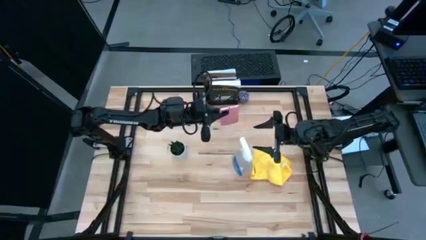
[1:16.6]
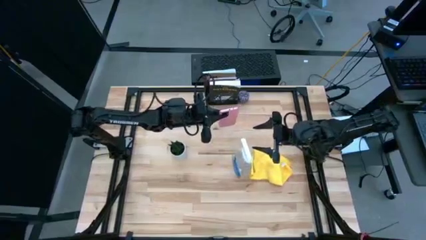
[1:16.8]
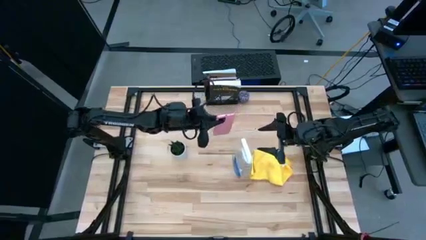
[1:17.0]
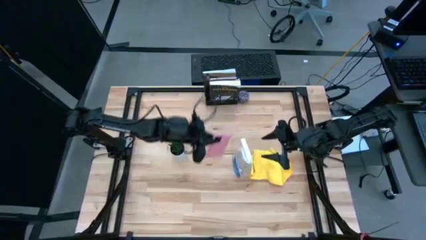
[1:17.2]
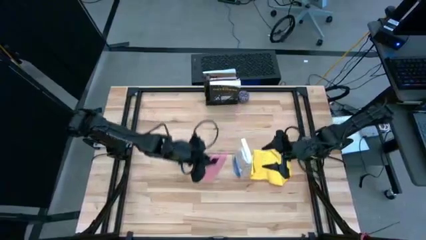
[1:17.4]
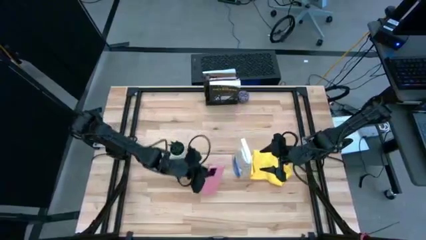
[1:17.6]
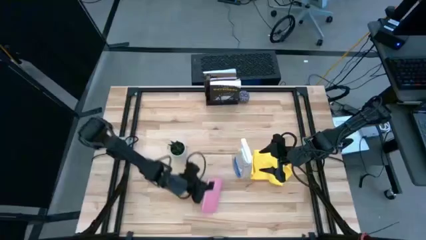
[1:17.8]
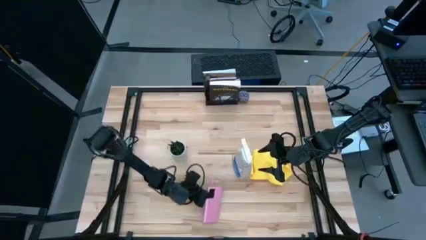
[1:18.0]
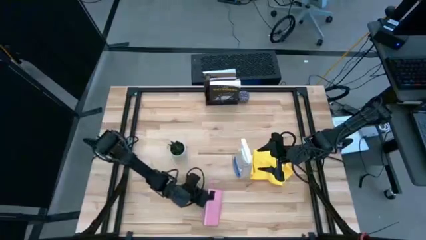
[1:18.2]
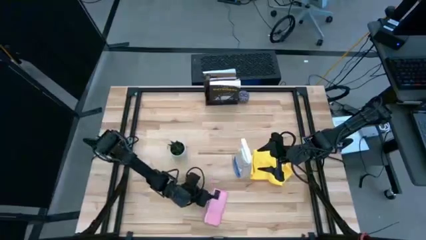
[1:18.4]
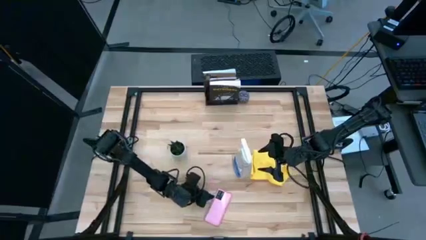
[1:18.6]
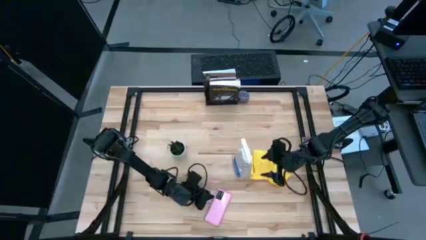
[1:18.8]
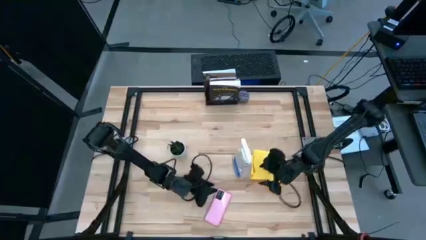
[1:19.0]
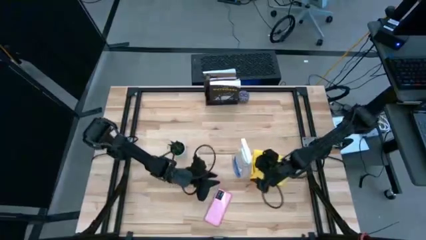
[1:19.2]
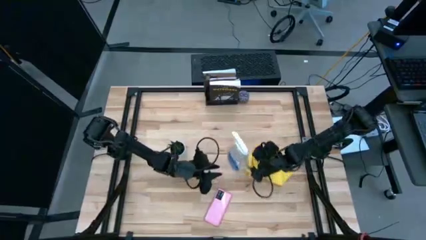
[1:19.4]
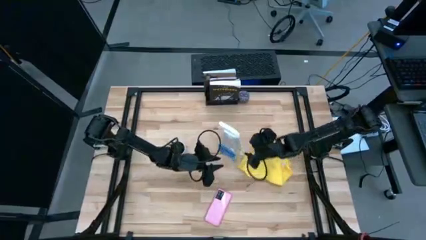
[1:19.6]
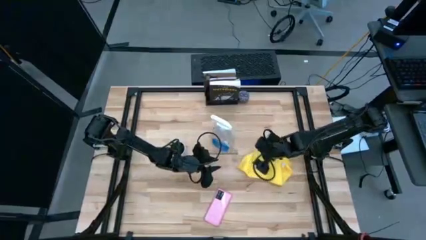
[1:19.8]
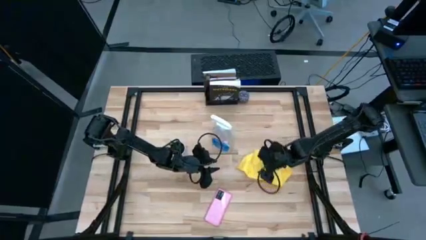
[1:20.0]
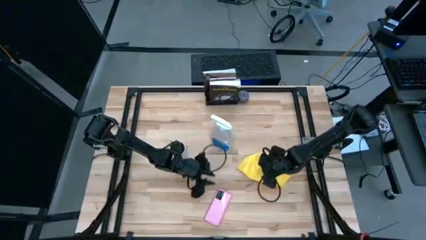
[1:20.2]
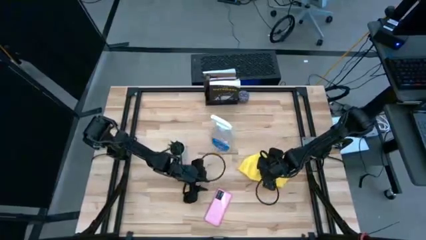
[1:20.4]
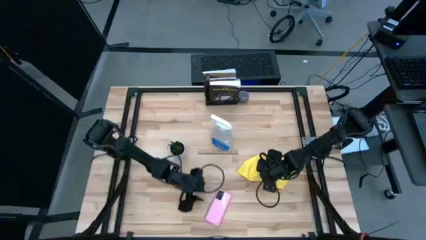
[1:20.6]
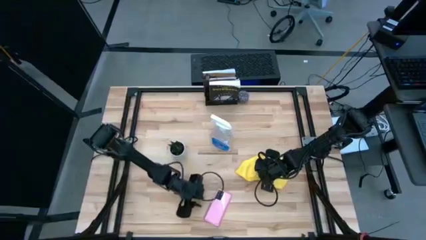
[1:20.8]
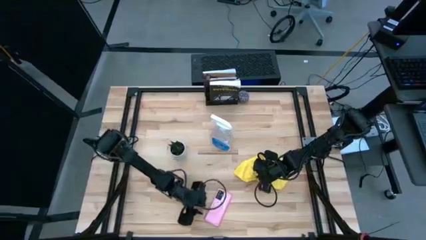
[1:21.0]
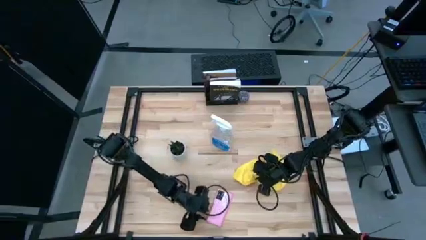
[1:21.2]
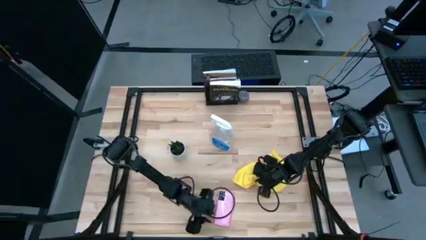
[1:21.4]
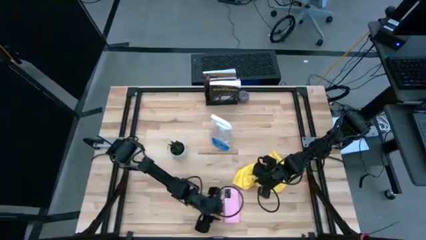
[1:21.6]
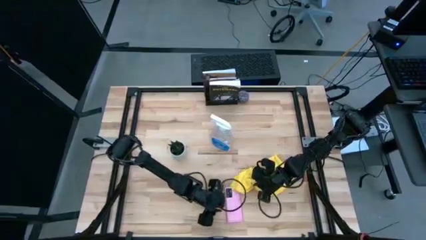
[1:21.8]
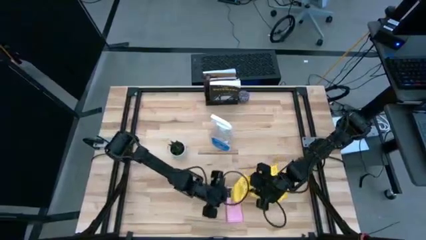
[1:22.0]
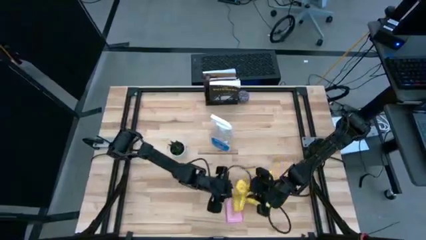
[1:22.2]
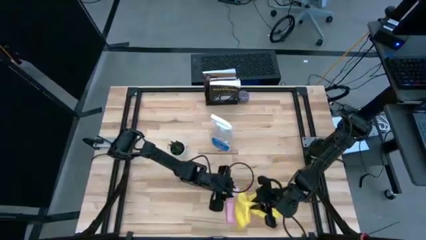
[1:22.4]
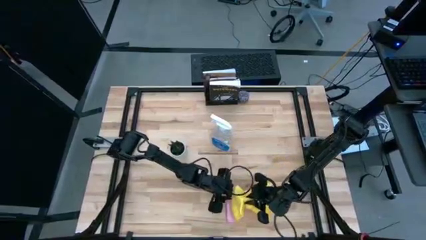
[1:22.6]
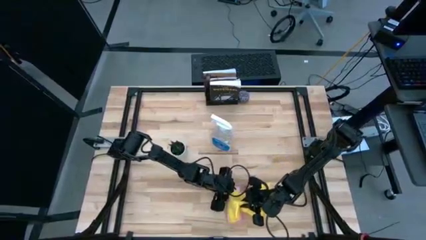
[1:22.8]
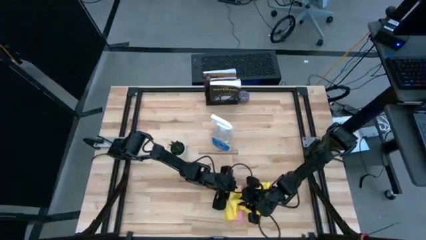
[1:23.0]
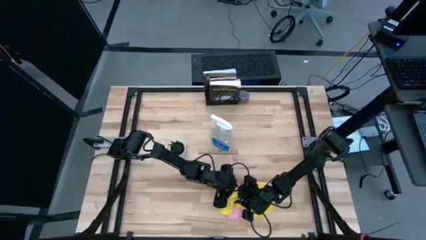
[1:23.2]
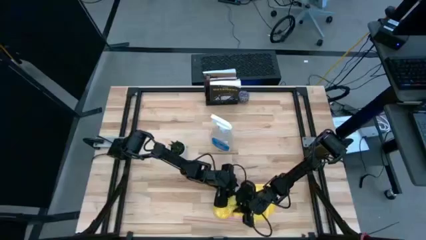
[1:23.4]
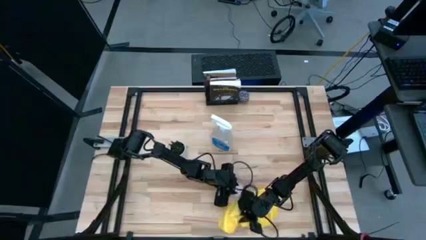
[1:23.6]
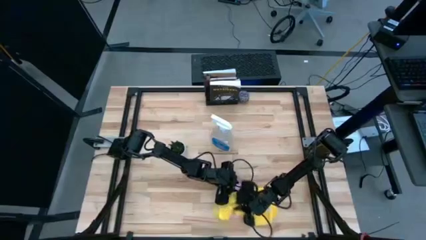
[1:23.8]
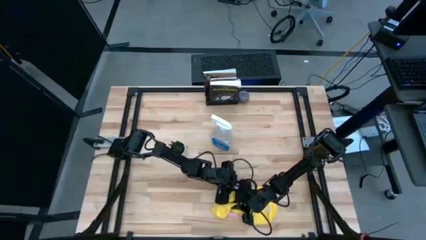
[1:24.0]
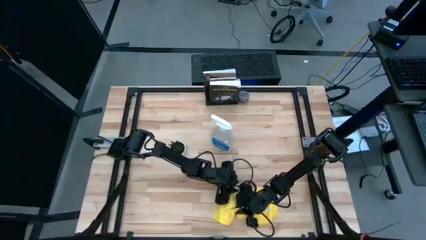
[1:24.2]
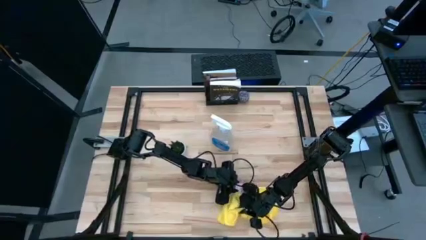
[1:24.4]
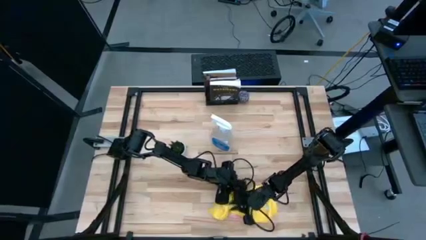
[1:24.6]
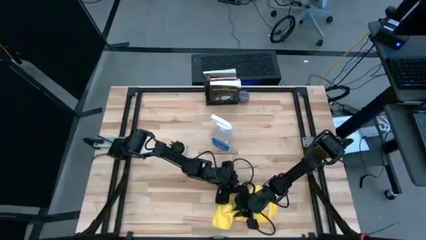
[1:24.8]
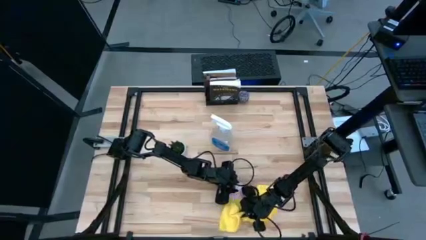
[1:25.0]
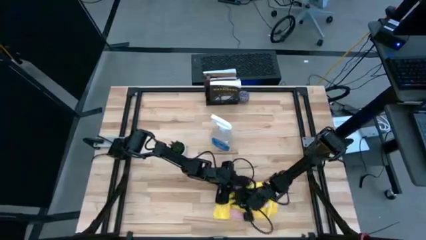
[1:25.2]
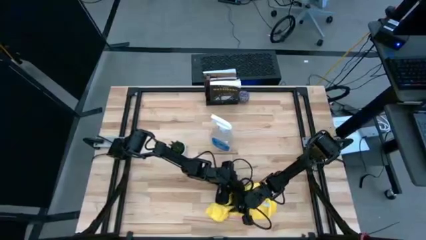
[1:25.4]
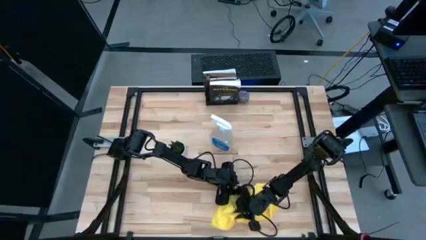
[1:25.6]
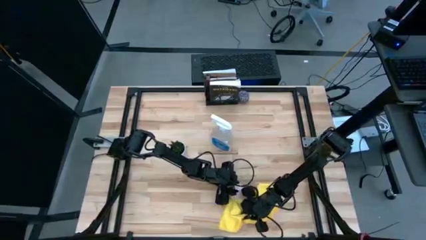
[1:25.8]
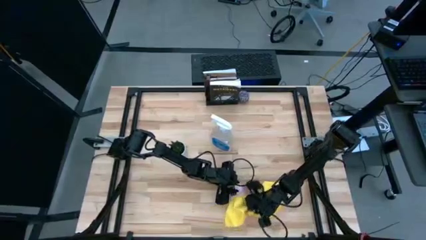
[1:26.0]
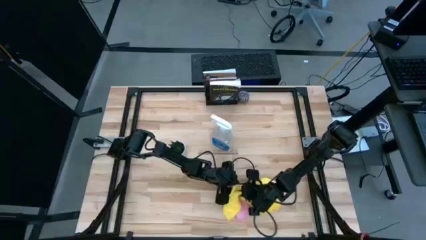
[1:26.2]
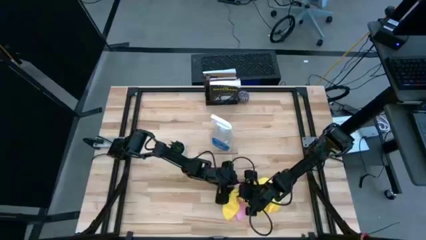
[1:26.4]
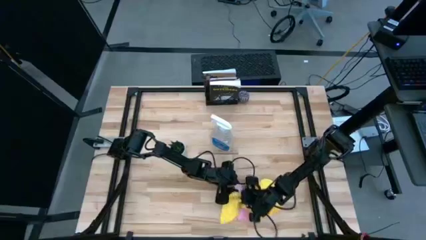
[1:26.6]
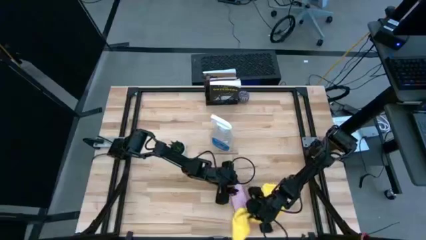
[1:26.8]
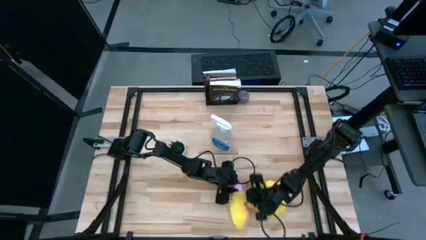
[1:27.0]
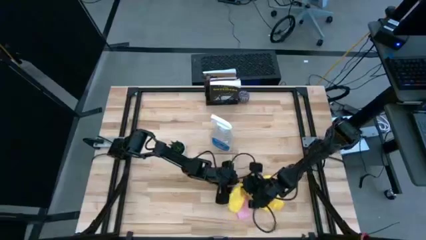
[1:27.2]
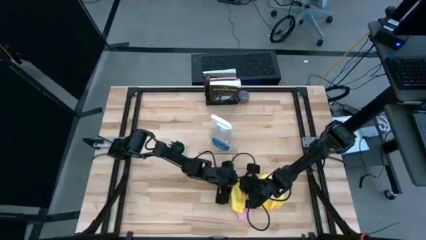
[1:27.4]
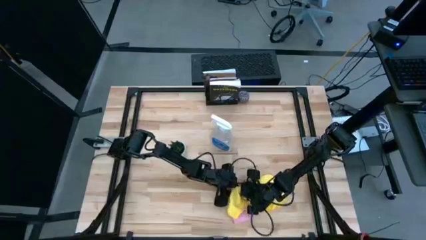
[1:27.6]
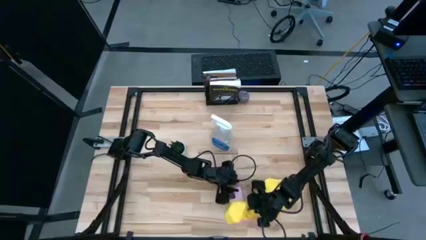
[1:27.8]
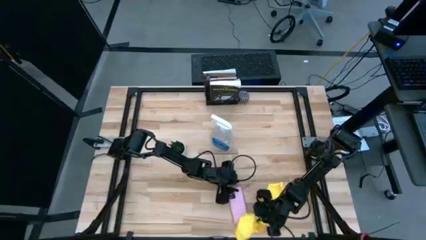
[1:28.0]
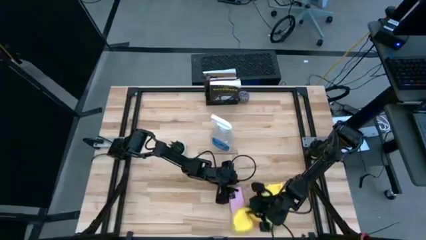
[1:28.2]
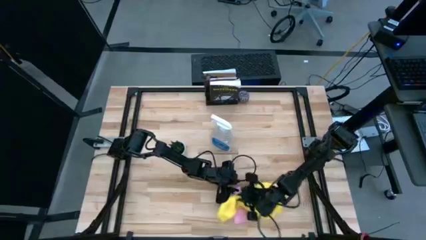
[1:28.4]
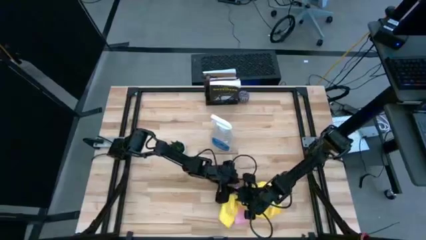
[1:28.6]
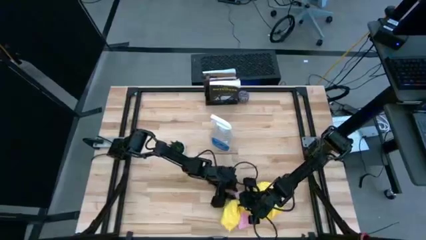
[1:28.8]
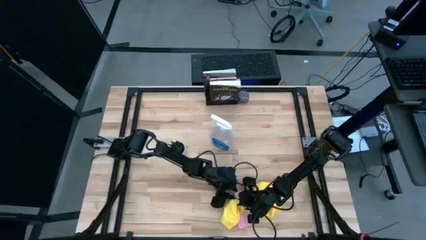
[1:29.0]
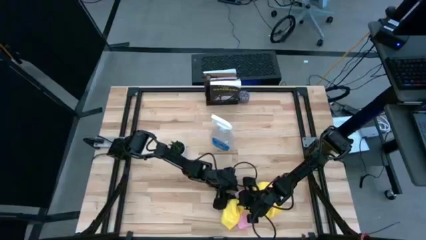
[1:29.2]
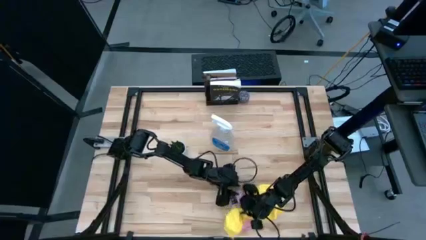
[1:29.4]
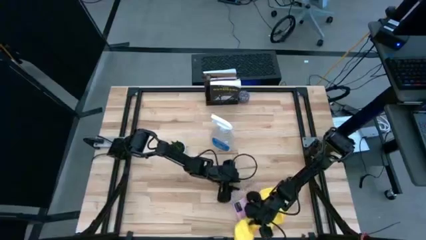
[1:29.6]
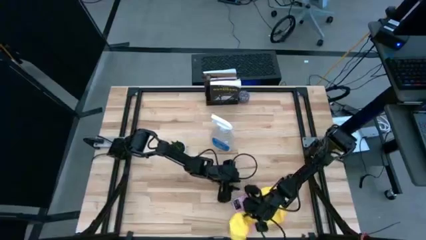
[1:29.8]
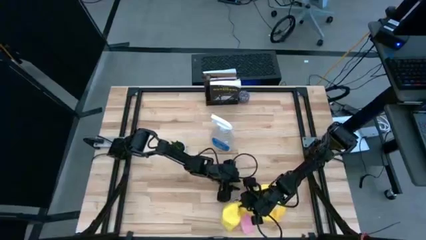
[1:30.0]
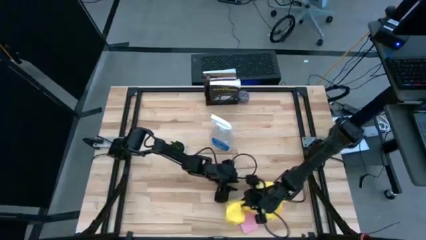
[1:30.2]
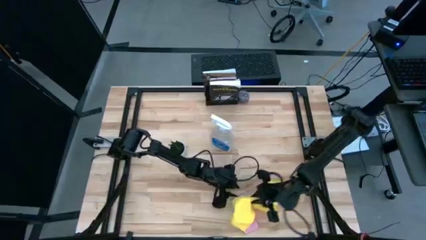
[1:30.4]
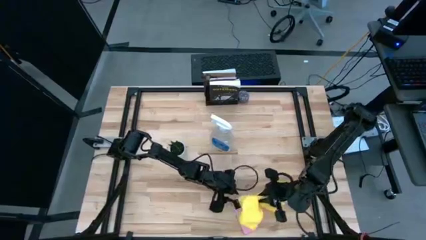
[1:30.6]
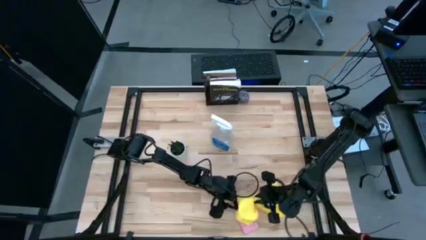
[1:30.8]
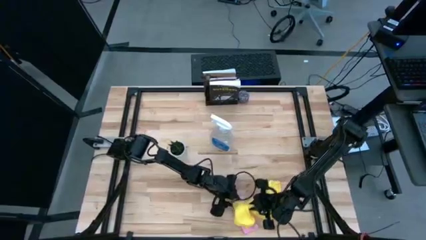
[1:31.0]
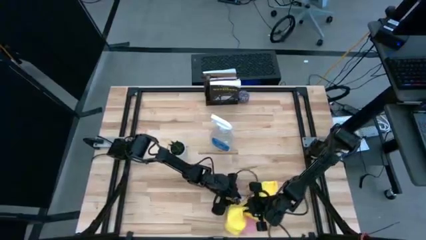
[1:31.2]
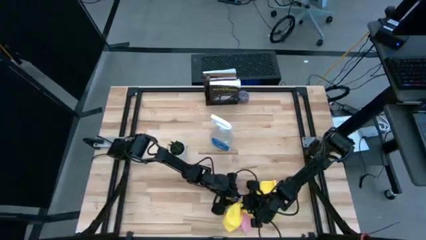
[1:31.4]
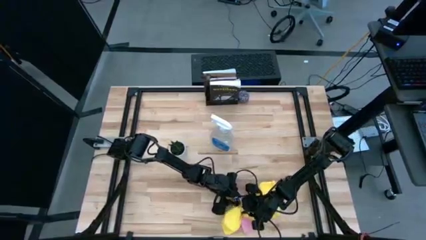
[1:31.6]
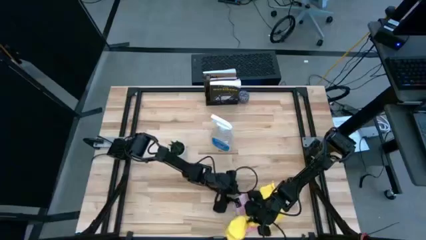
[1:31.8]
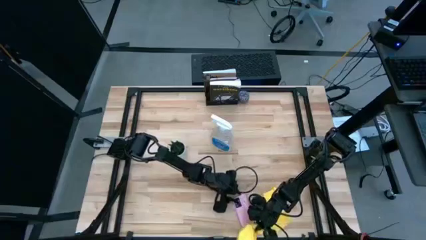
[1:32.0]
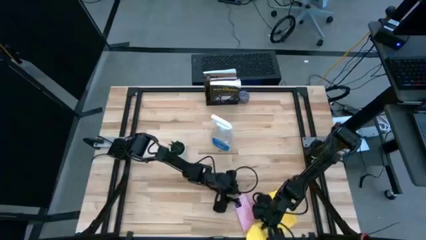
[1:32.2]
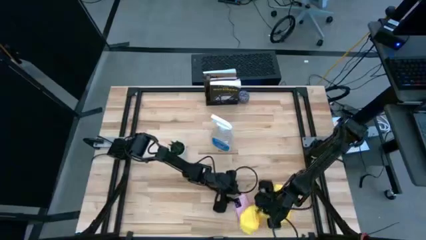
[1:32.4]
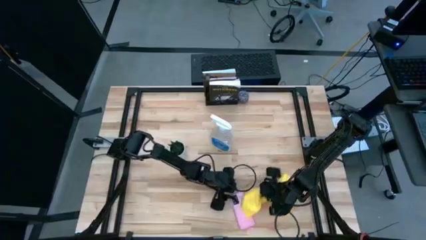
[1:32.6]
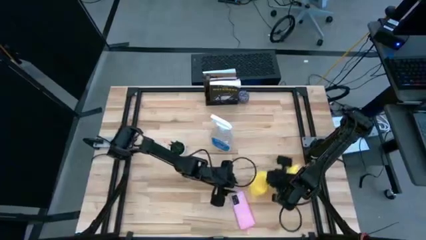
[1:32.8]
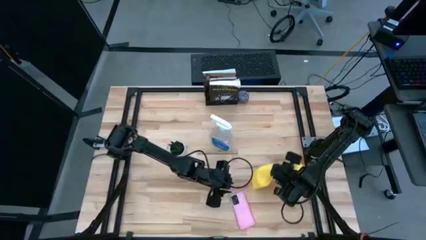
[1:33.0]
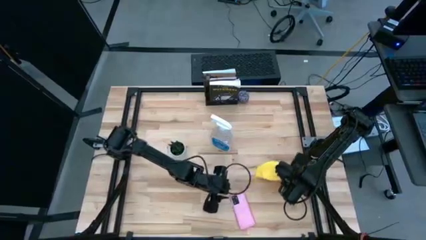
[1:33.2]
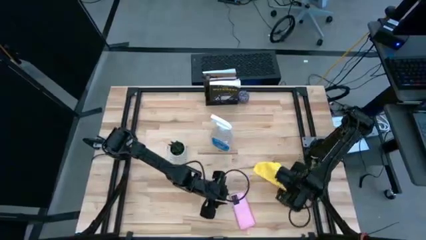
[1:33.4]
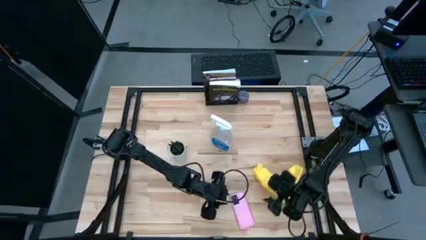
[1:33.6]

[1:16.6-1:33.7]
Task: Apply microfiber cloth
Wipe the back of the cellphone with a microfiber cloth
